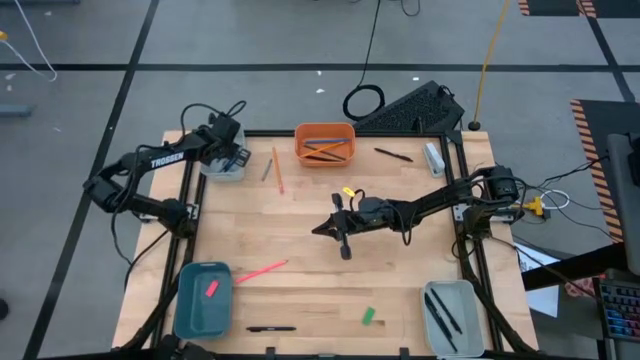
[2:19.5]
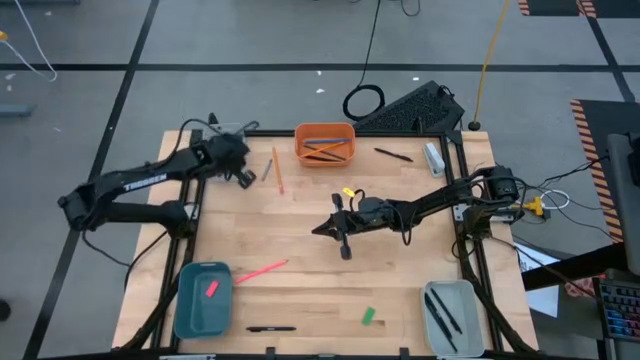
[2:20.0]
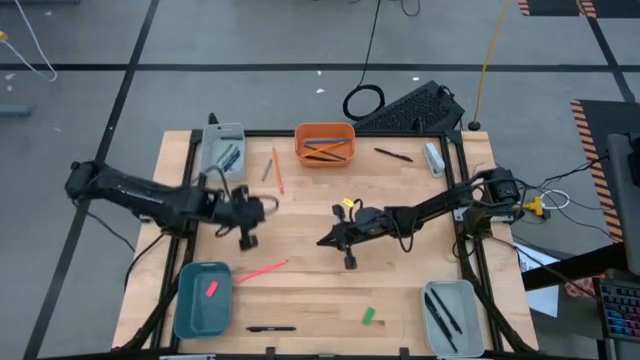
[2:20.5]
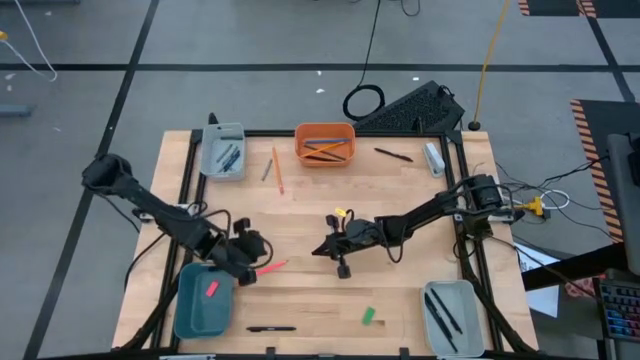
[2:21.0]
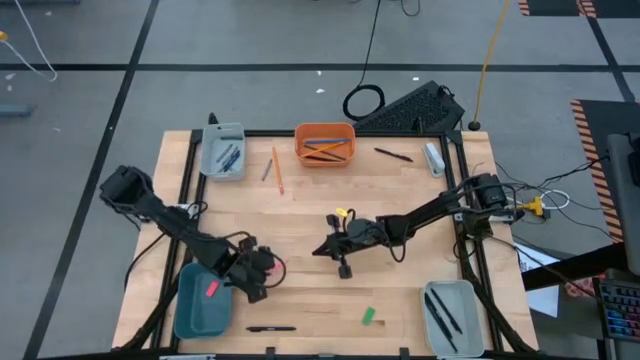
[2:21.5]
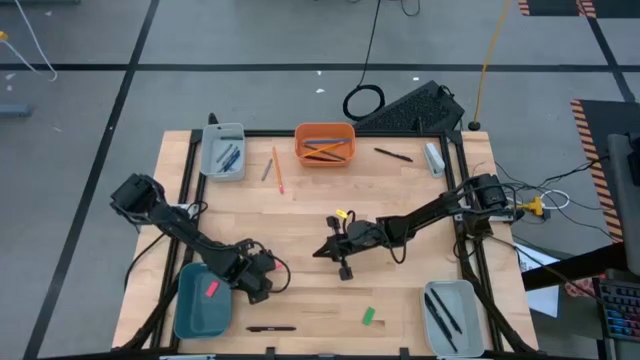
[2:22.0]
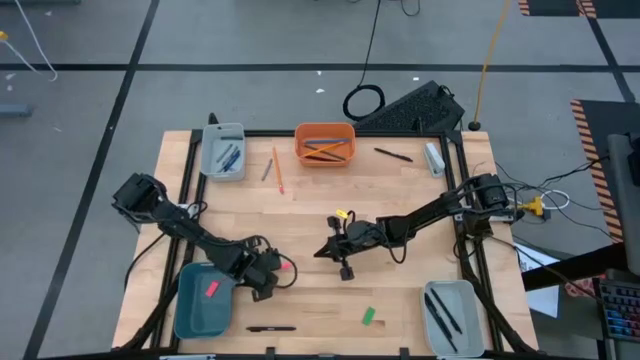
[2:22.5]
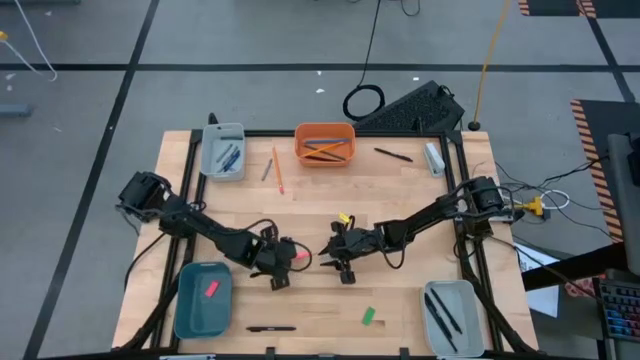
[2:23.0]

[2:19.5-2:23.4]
Task: Sort crayons/erasers/pens/pencils in bins
Put the pink pencil into the orange bin

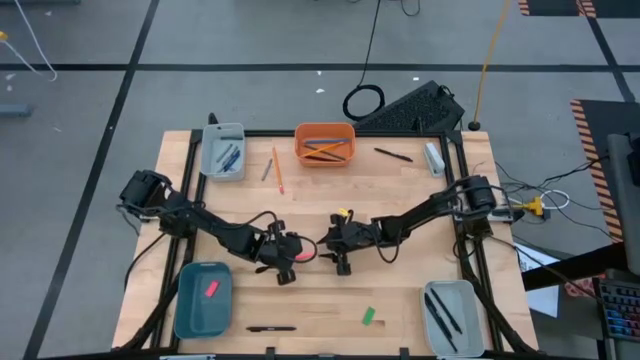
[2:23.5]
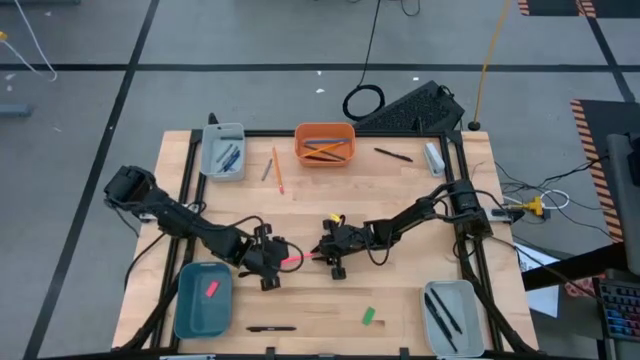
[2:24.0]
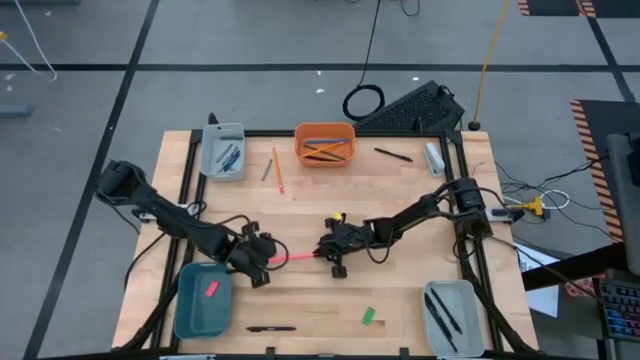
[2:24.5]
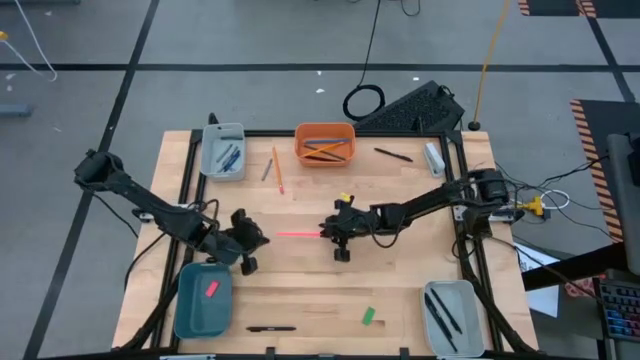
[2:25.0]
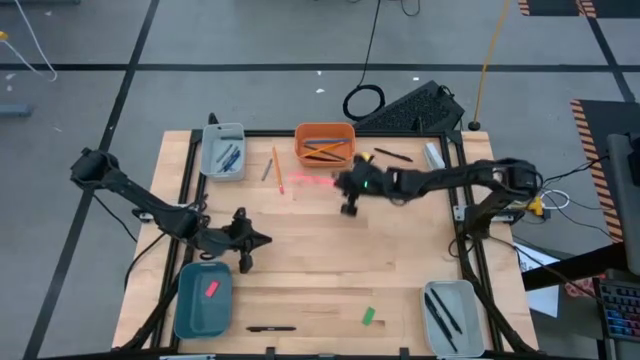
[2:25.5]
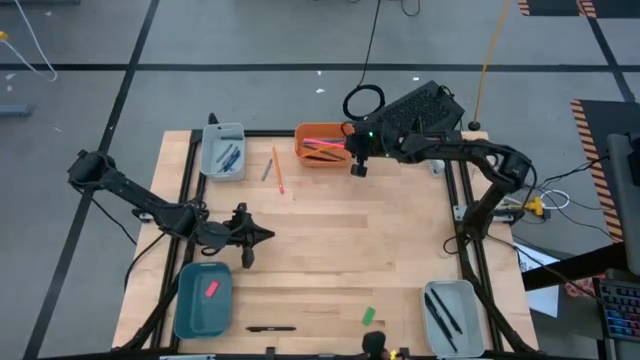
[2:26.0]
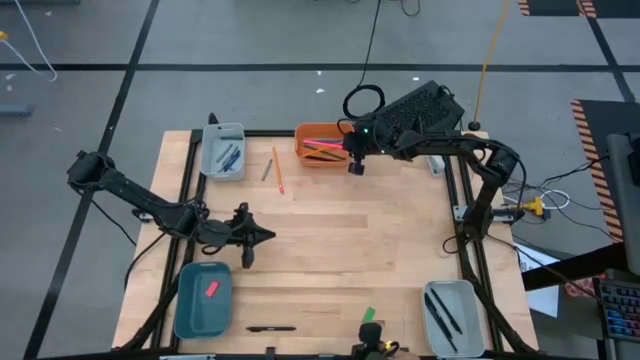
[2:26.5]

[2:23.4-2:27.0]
Put the pink pencil into the orange bin

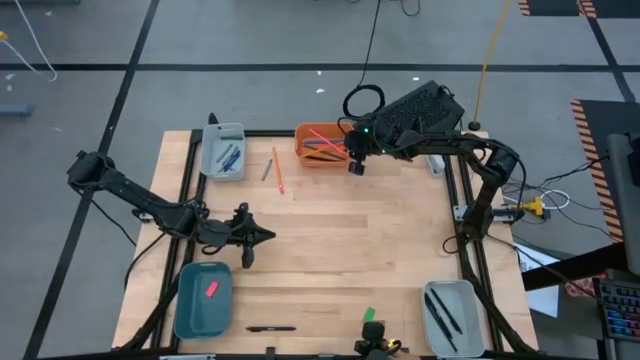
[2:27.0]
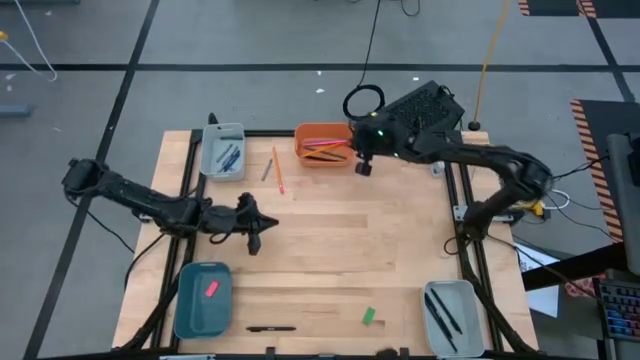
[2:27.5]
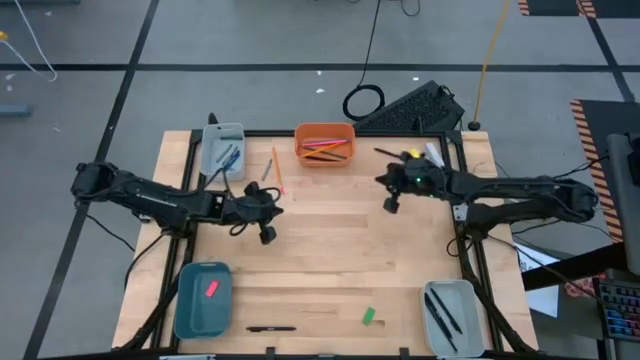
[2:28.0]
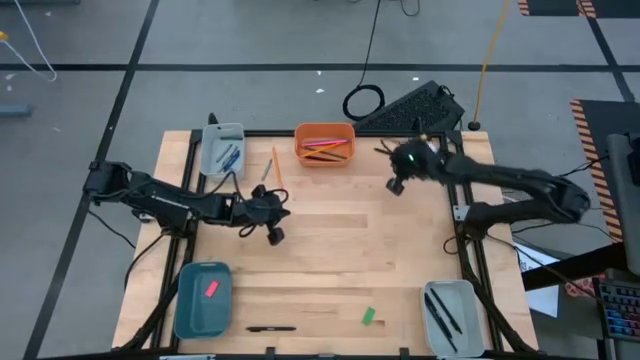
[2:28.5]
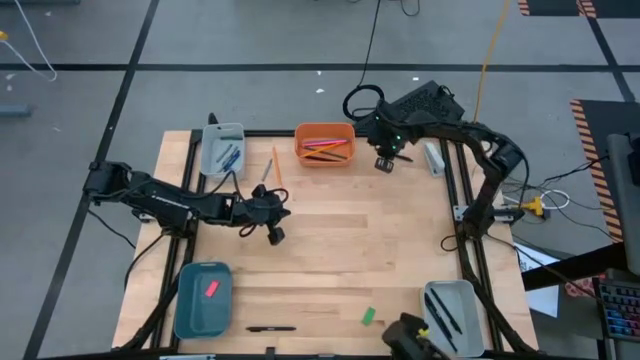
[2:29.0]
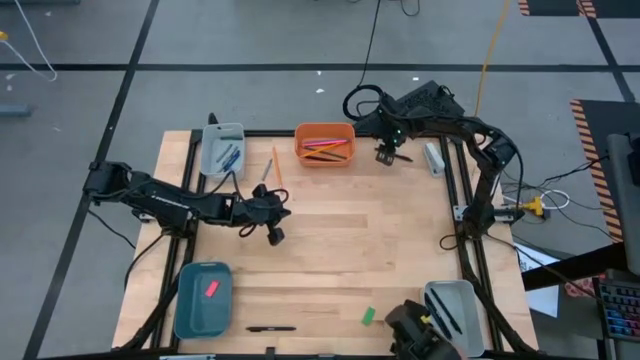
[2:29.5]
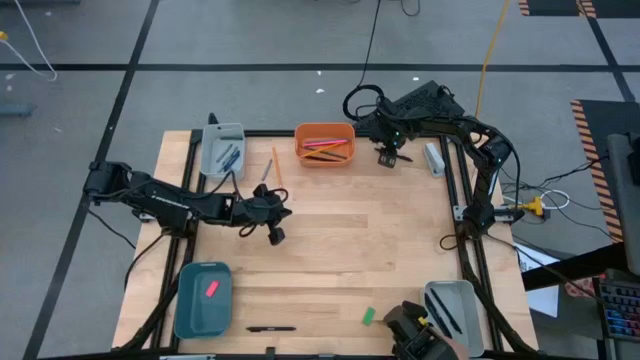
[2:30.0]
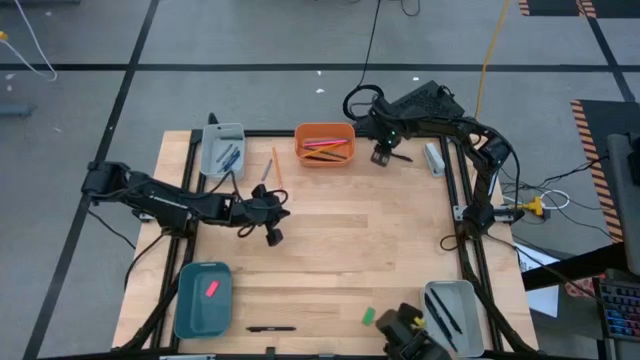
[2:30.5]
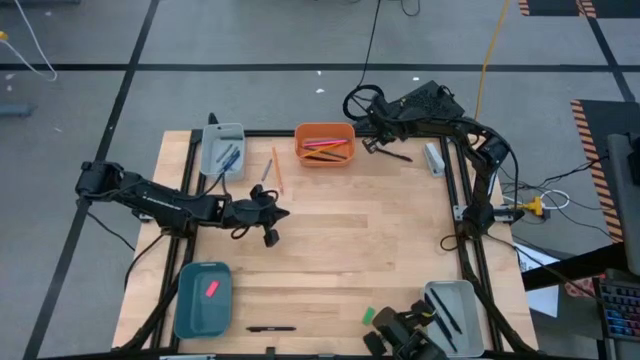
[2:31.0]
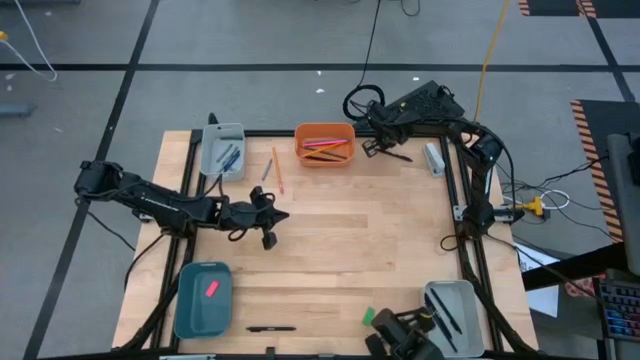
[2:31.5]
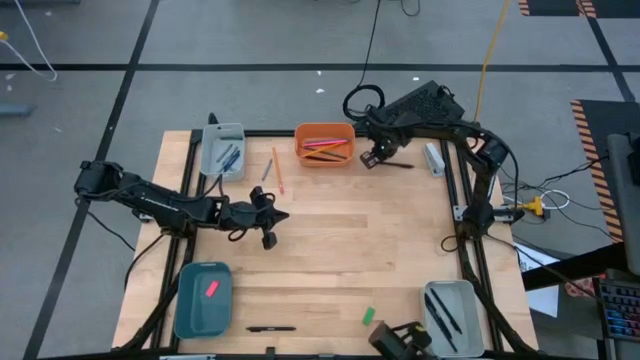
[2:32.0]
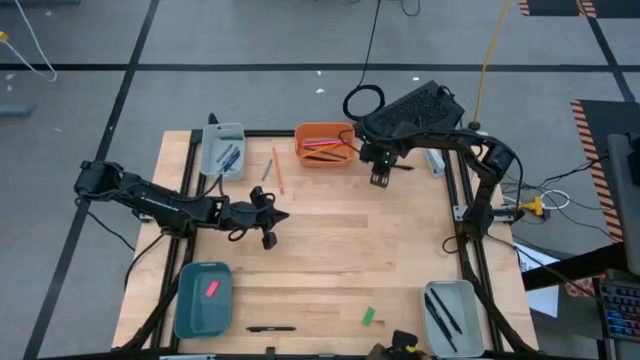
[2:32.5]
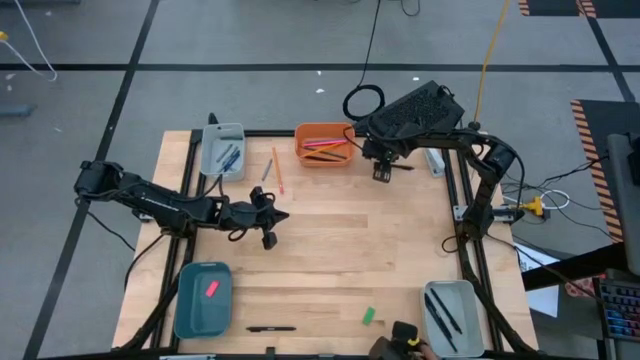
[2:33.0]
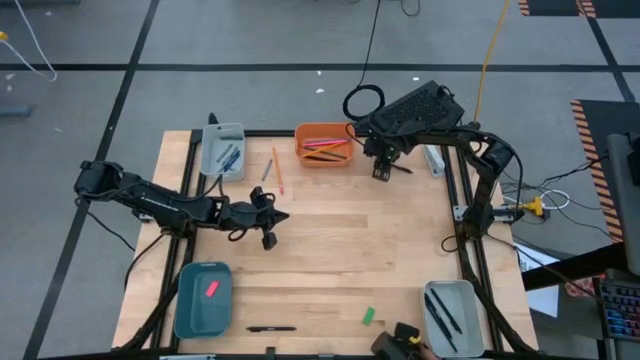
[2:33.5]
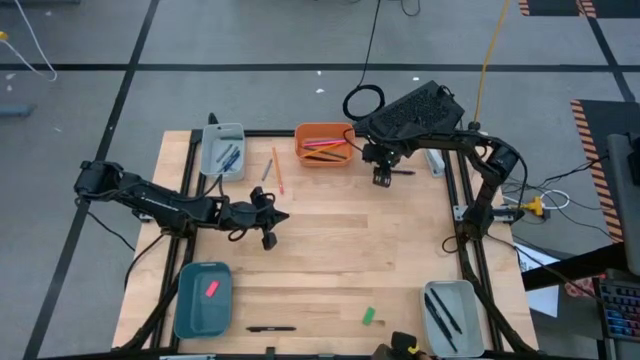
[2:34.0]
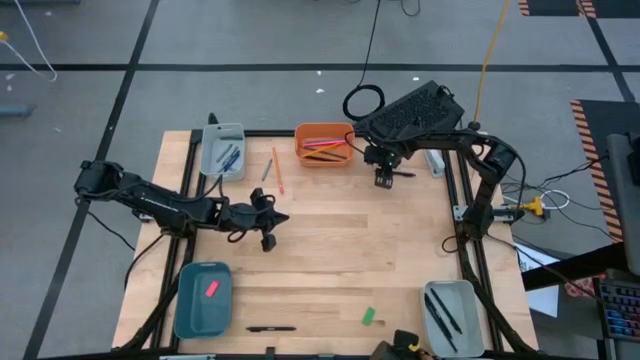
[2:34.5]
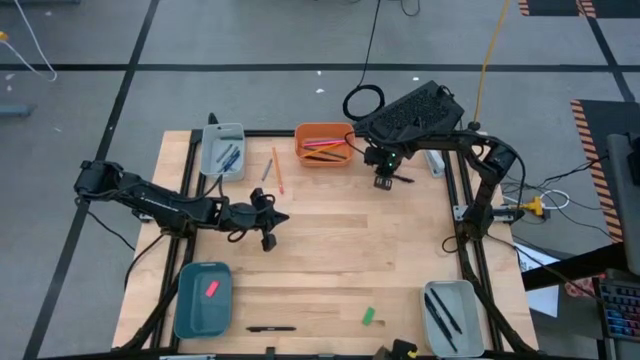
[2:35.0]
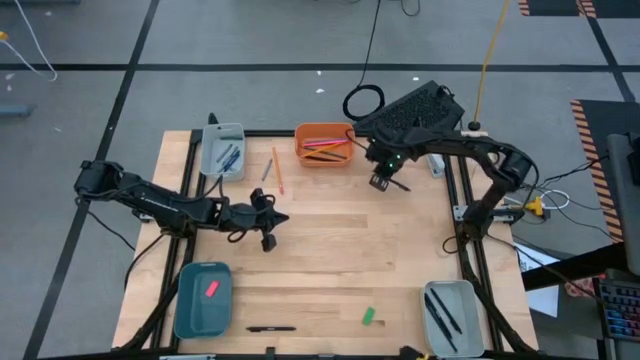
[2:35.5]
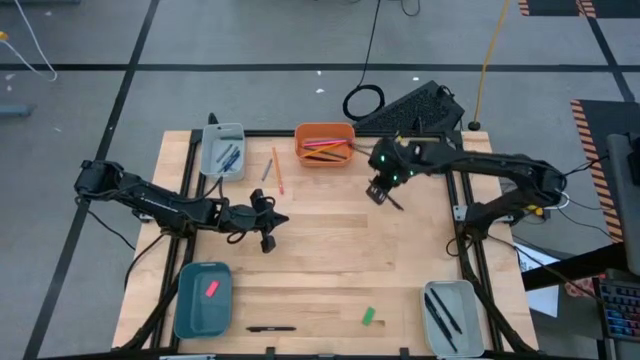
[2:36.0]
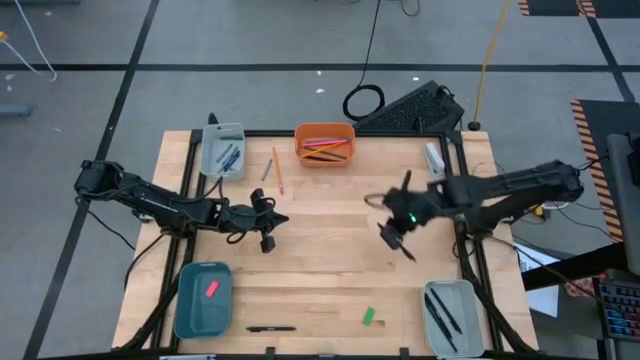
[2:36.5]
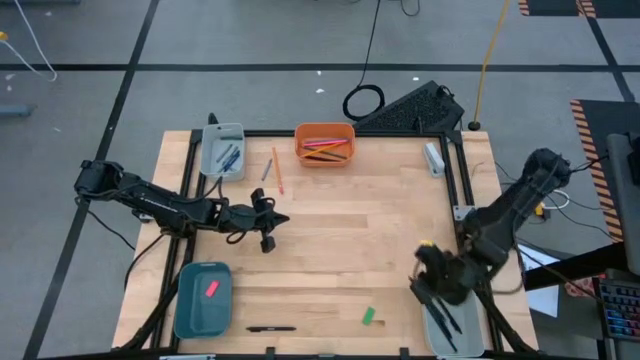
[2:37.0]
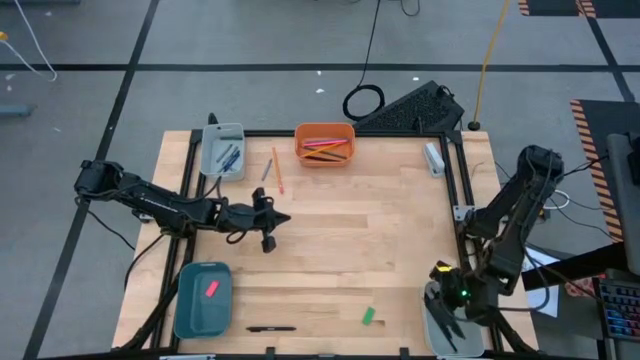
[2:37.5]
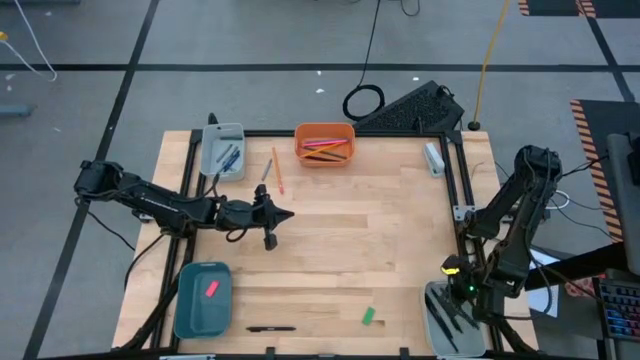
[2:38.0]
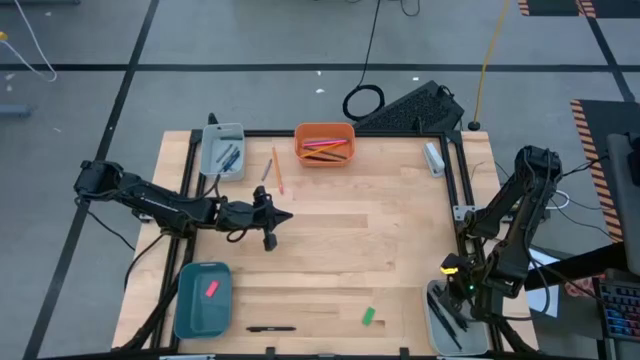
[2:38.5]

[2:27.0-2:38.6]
Put the black pen into the bottom gray bin
